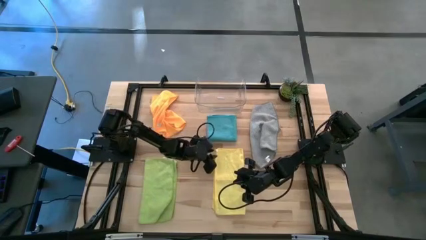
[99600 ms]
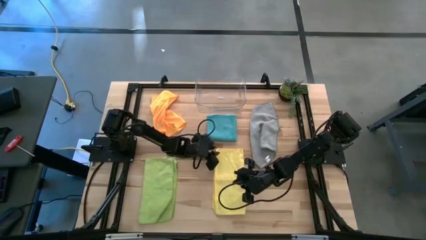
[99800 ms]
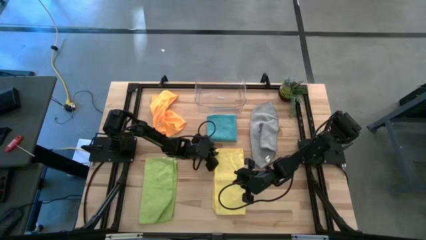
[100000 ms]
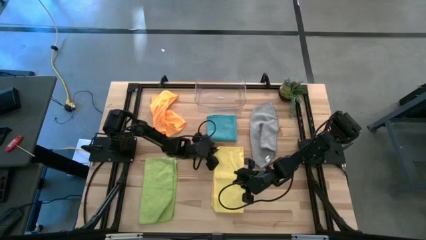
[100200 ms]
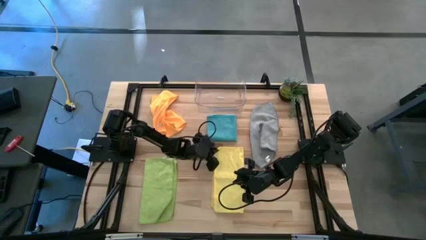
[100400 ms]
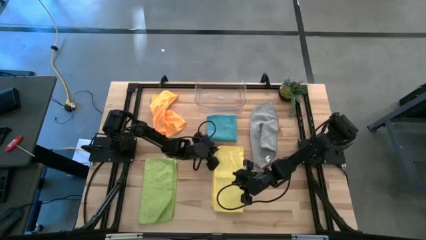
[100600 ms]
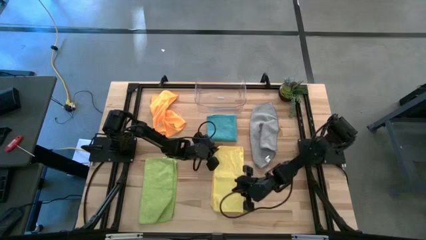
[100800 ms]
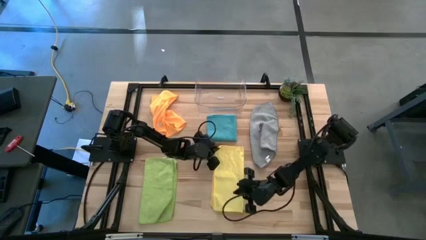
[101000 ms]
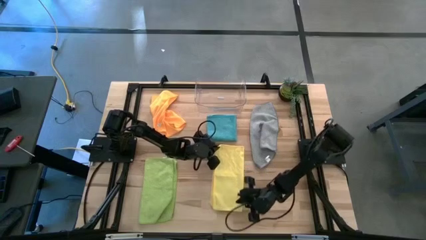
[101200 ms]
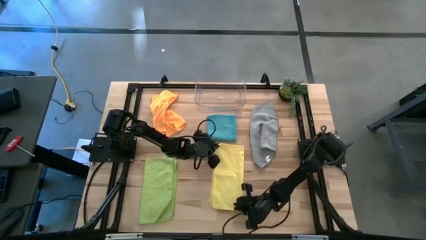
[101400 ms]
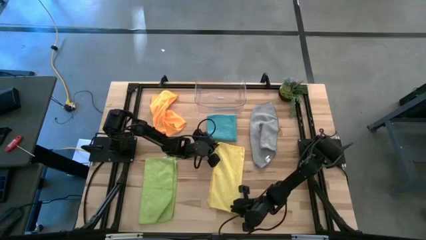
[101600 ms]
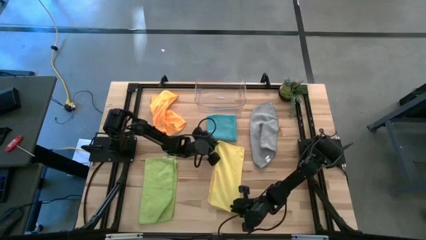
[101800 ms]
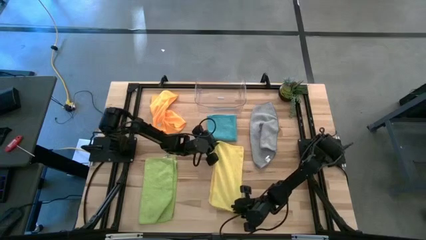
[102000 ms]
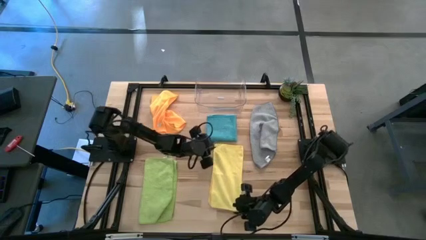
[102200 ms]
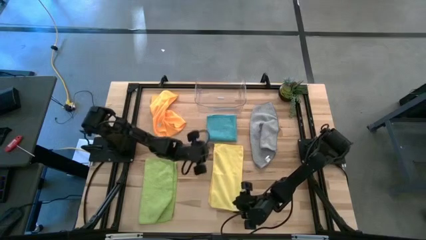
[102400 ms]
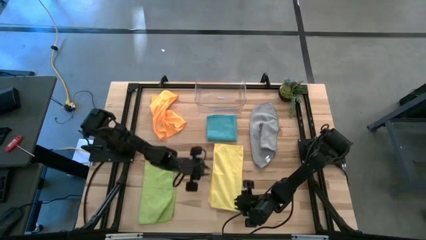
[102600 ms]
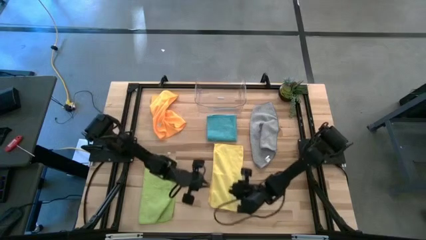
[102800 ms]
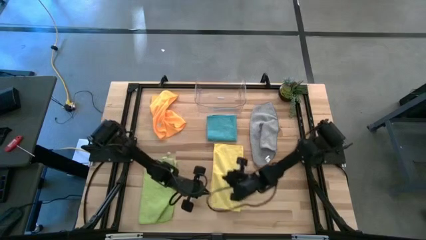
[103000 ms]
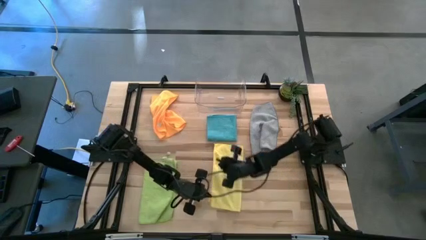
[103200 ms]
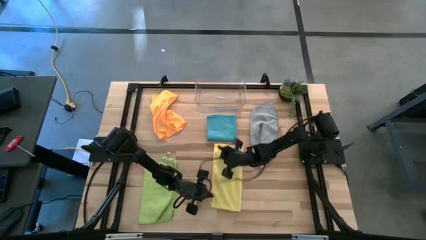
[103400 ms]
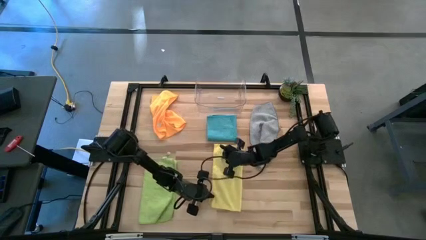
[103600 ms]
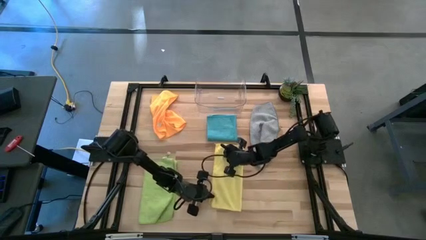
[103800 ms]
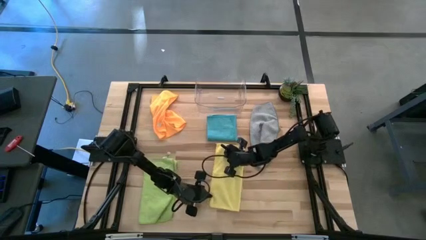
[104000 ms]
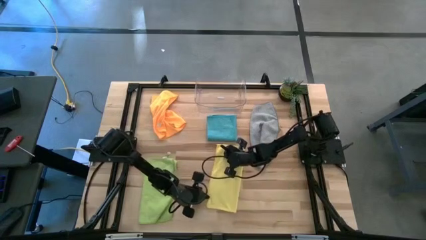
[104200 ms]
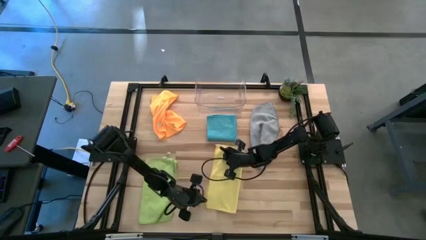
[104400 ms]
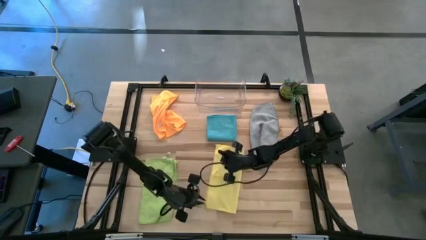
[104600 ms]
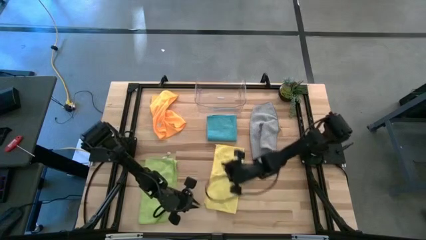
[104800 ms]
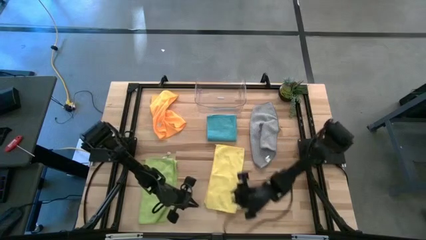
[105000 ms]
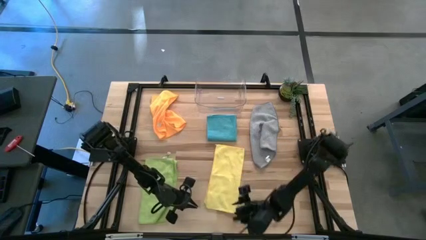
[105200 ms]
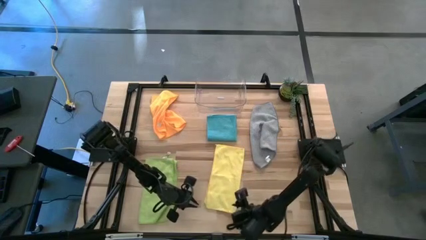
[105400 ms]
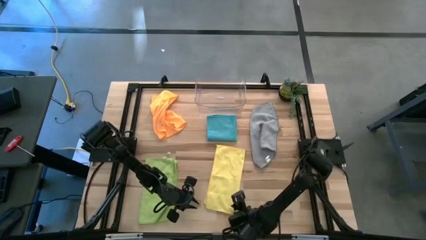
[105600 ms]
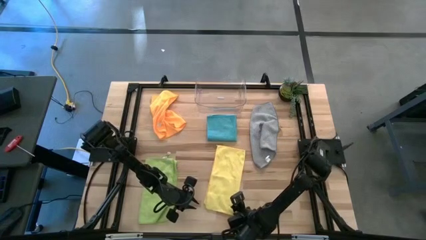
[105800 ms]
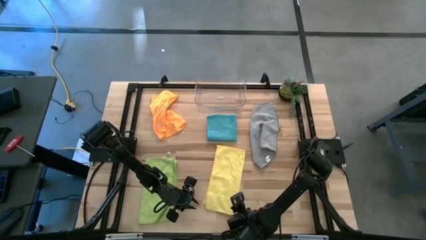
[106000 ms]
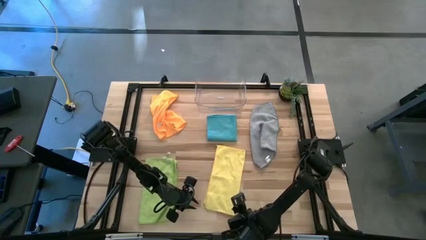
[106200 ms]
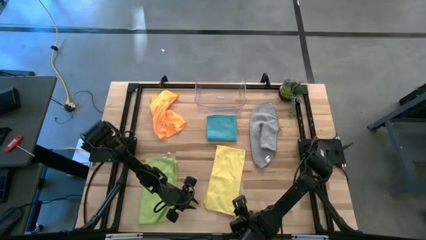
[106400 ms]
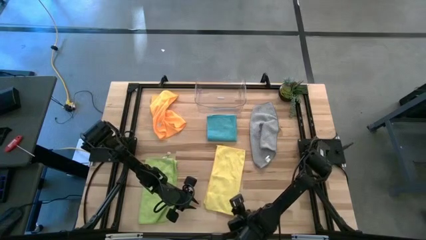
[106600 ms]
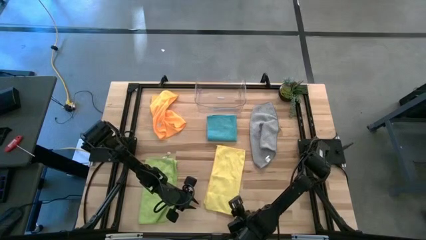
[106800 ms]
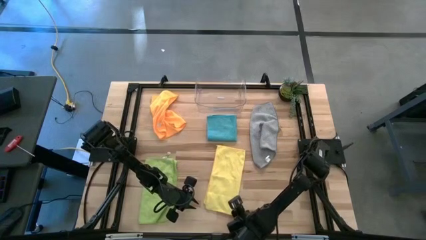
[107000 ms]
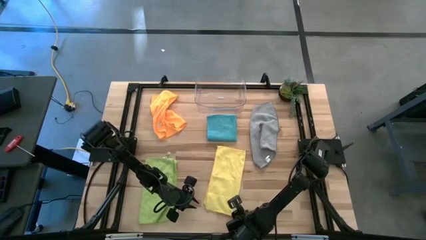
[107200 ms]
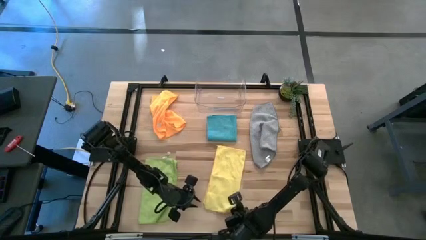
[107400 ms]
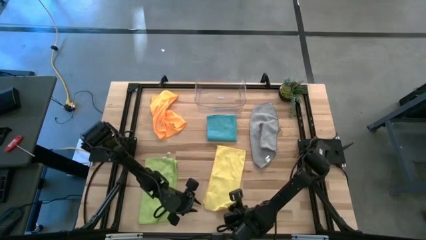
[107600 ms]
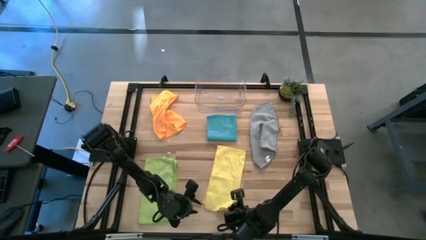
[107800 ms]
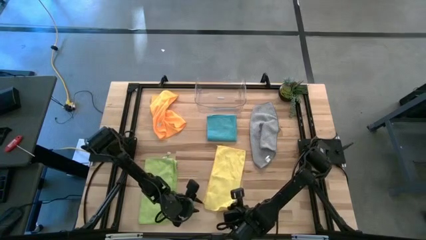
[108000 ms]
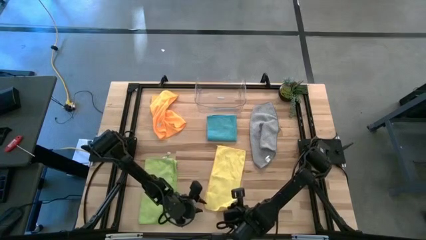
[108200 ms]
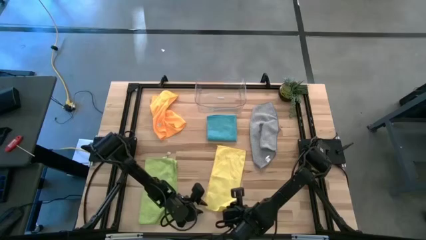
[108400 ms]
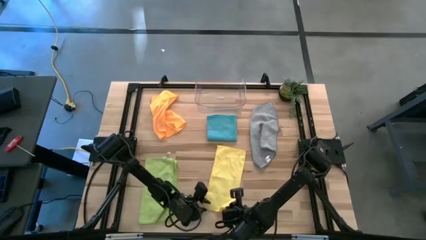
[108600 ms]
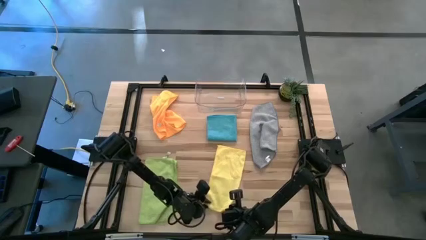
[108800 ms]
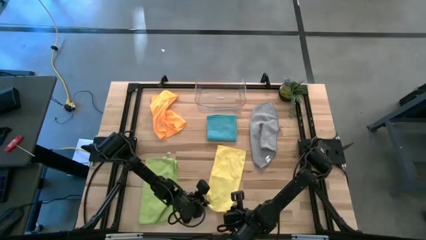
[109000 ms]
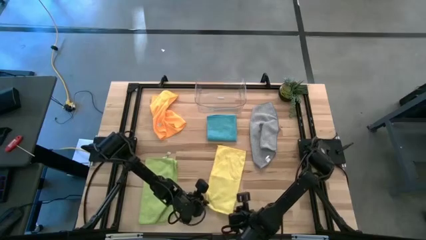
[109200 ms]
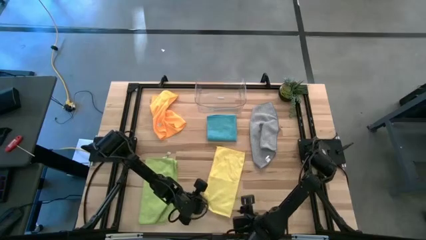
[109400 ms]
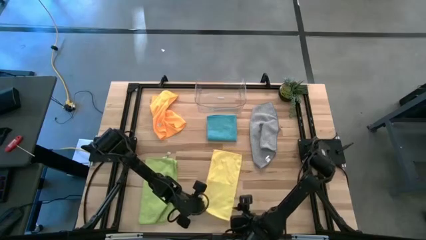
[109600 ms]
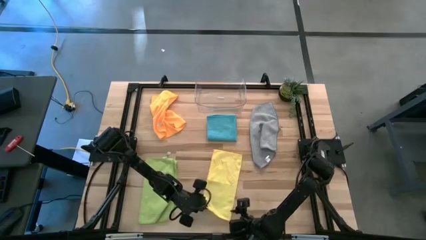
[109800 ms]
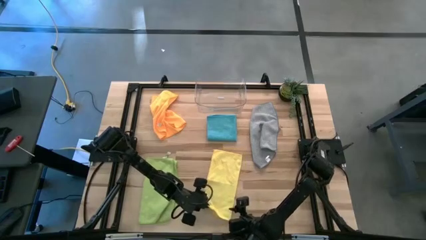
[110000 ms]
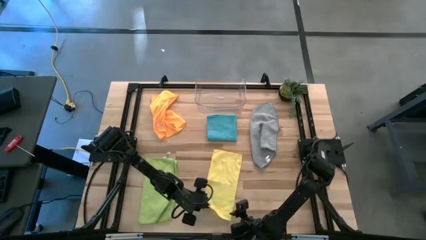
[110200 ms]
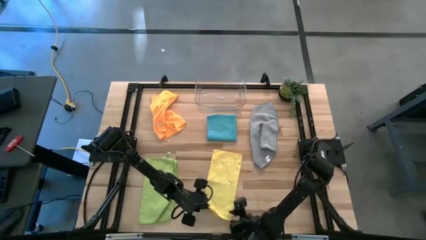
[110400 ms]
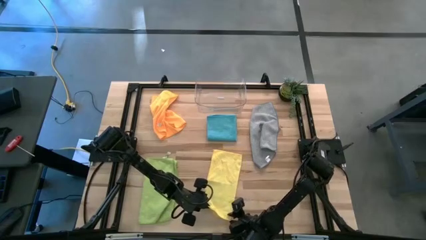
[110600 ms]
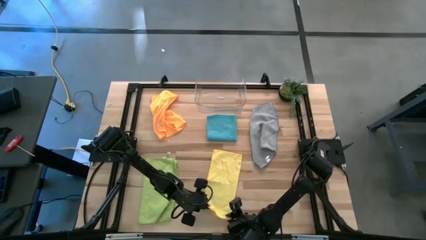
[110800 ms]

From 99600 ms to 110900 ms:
Task: Fold microfiber towels
Fold the yellow towel on the table
